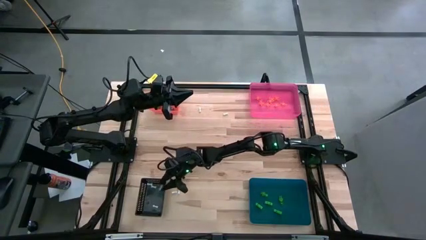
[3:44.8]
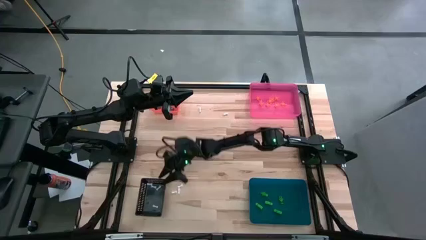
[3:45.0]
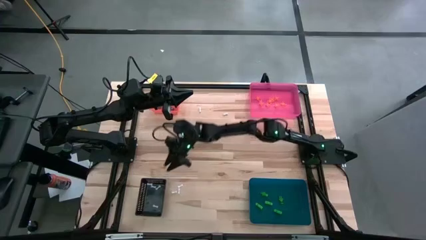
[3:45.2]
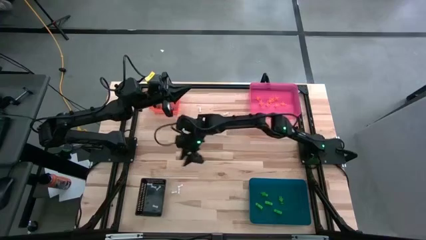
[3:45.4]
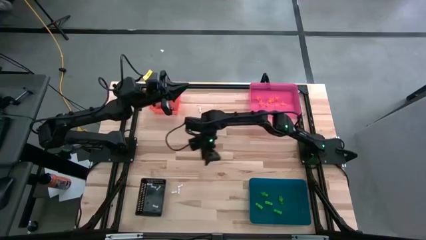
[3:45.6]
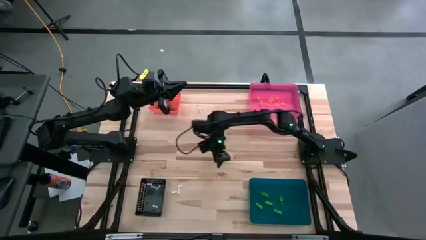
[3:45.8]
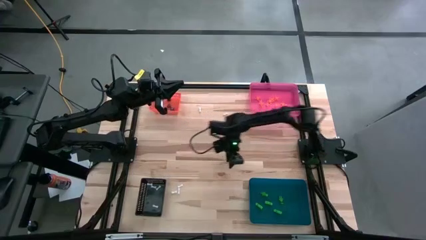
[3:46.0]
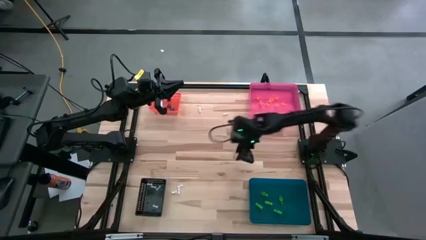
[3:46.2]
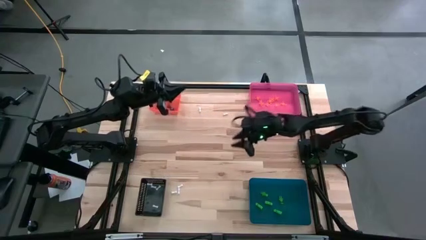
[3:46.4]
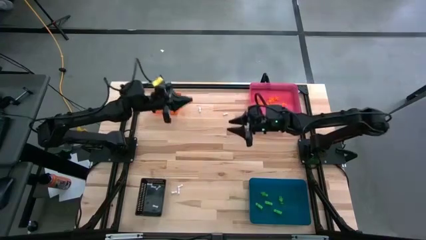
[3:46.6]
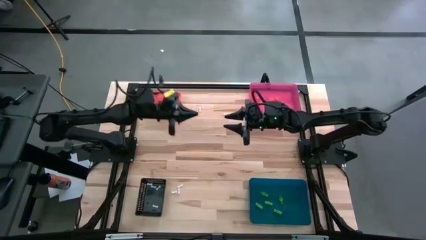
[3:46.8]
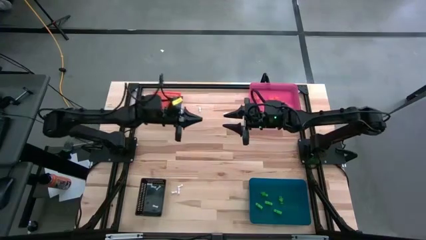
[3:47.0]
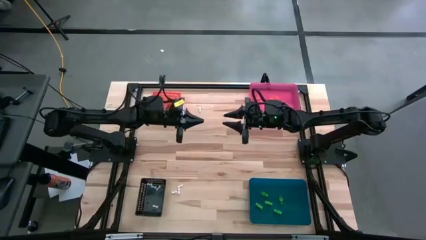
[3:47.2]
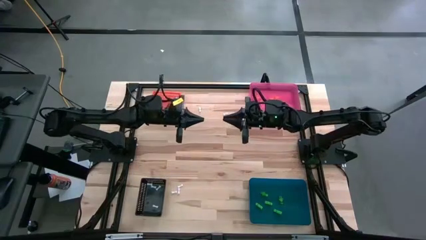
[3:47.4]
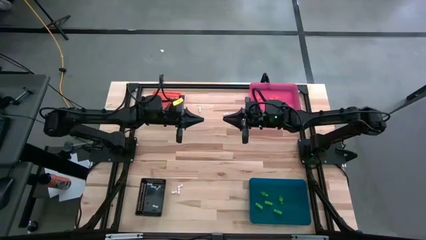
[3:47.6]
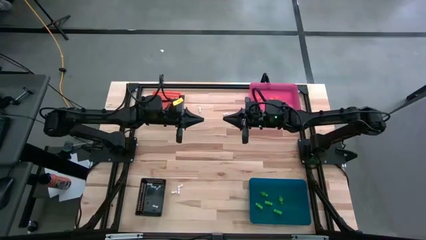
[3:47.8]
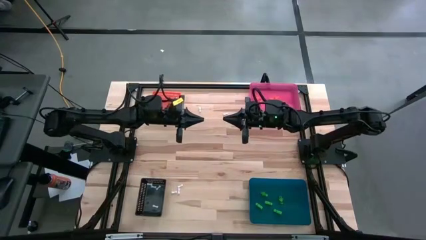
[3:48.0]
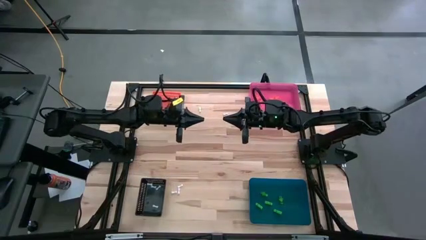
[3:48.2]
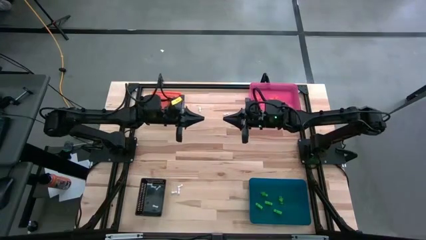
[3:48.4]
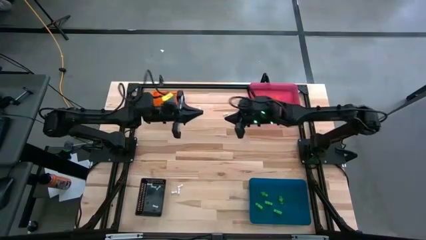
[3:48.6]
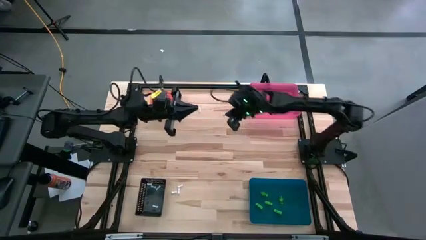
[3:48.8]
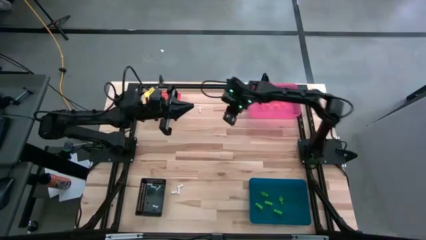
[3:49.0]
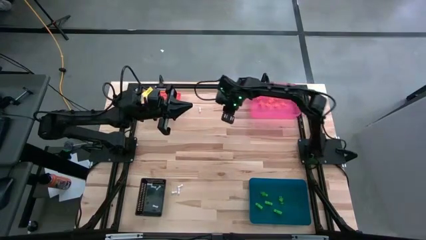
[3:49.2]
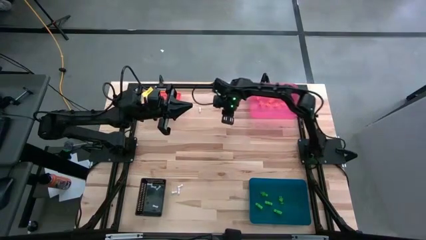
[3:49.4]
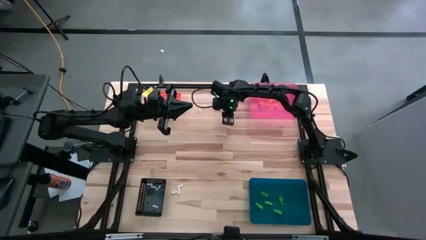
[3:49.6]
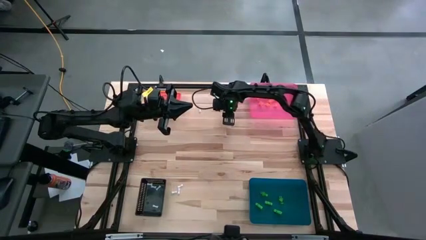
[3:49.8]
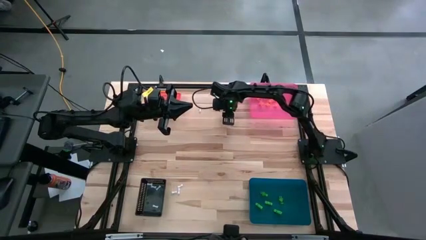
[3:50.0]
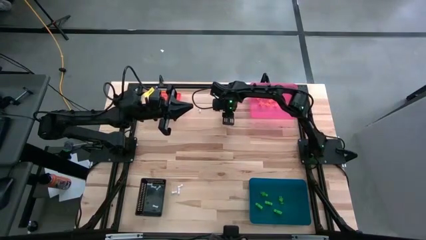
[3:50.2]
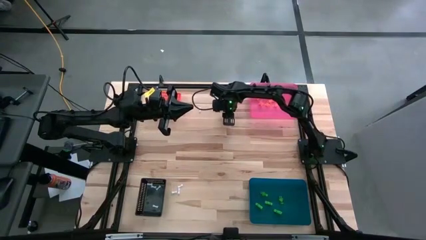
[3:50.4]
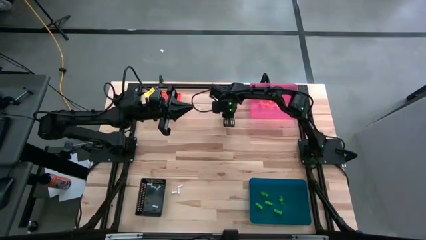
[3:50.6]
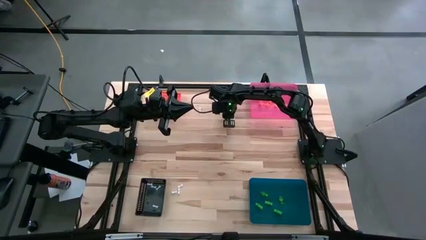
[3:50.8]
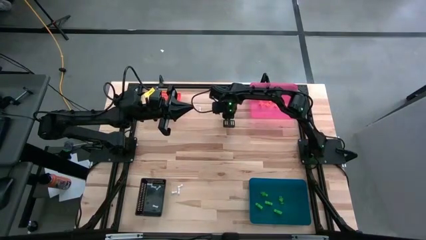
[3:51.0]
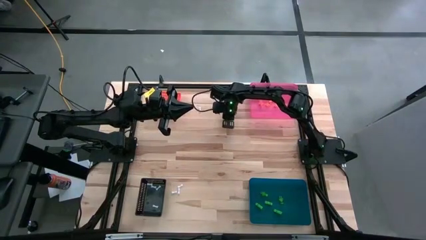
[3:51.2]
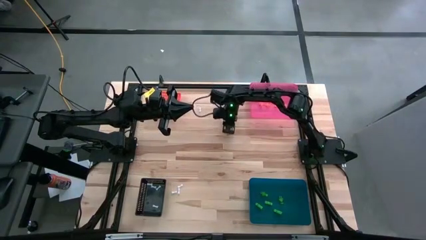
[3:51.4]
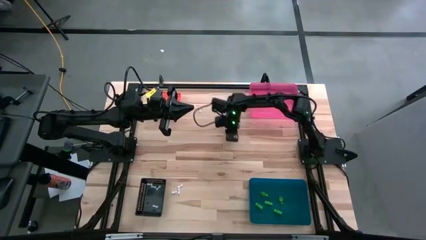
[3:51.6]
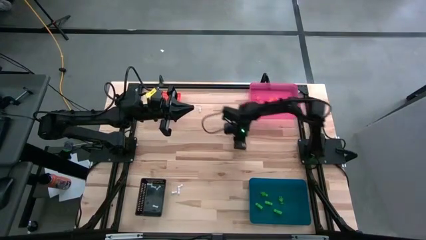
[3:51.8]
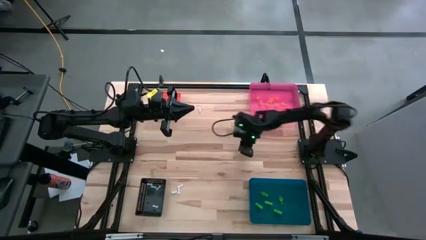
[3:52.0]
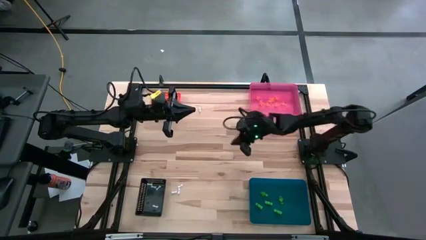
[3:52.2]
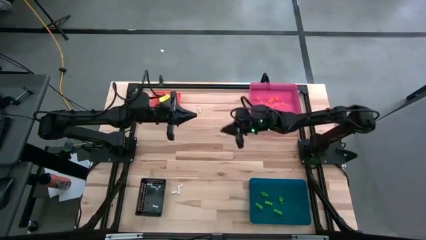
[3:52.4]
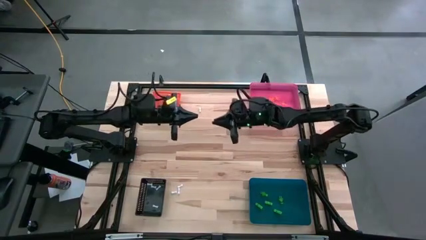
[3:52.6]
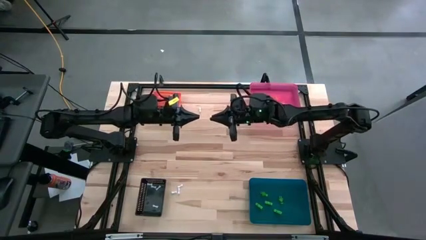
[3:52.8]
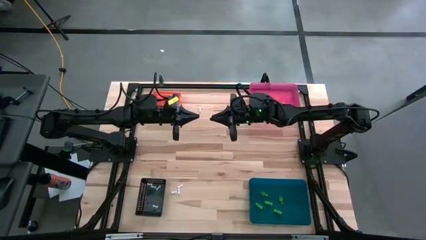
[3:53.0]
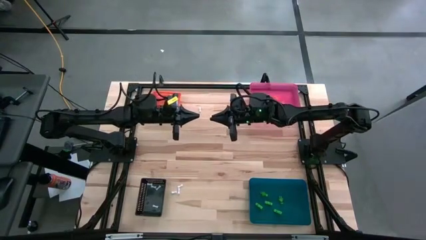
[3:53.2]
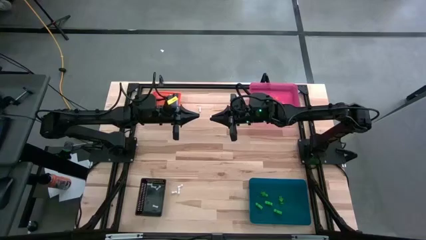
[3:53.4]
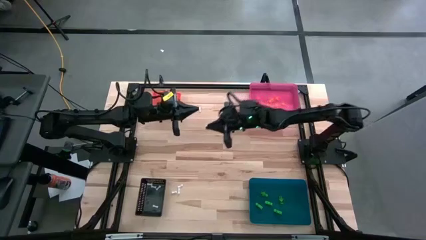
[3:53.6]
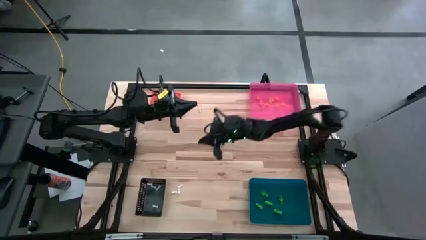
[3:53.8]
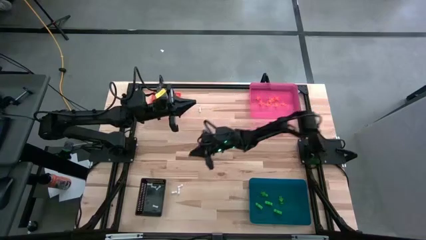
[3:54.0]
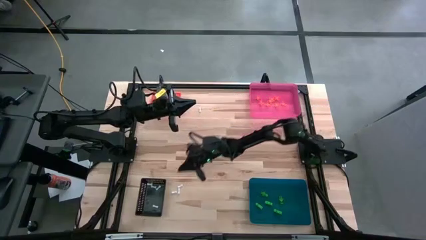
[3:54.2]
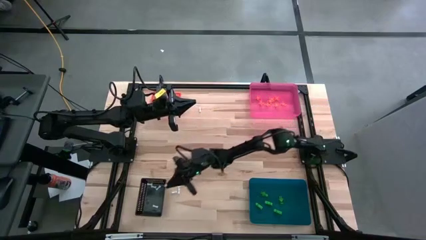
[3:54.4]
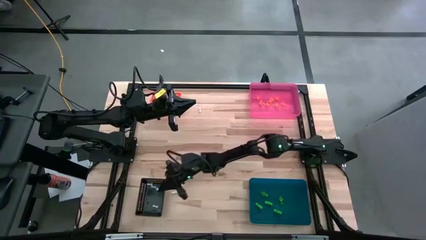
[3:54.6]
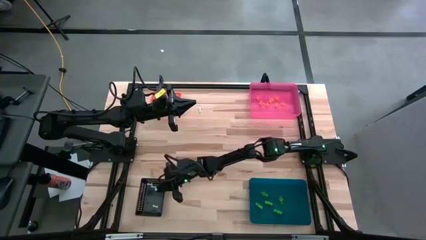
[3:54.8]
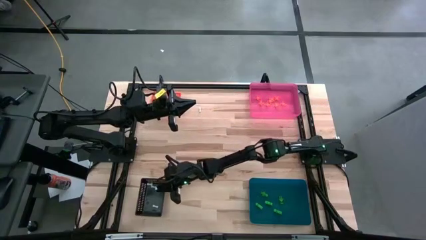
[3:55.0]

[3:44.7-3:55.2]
Task: Sort Halloween decoration
Put the white bone toy into the black bin

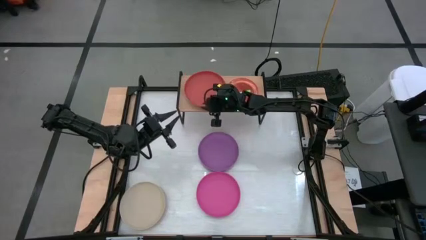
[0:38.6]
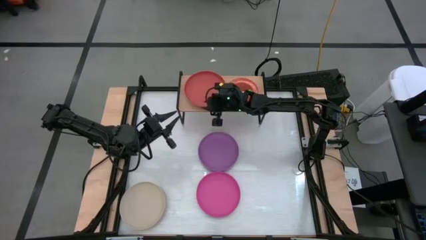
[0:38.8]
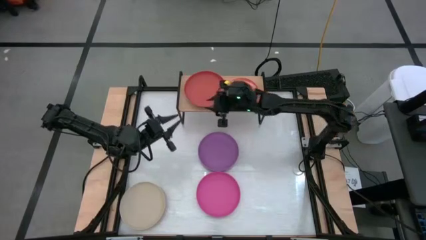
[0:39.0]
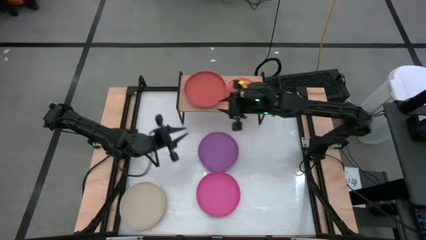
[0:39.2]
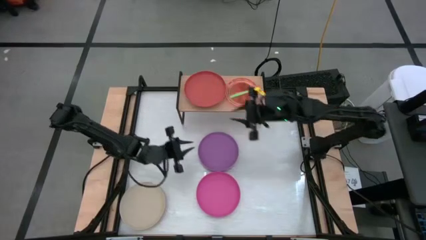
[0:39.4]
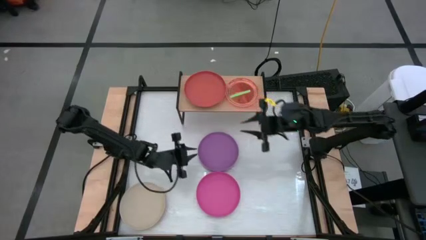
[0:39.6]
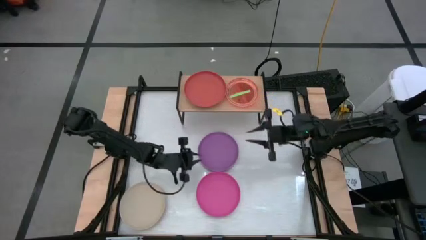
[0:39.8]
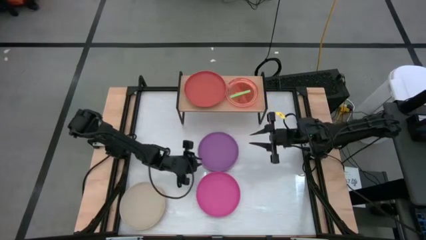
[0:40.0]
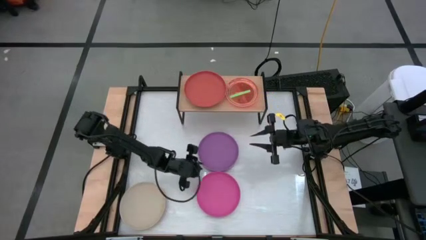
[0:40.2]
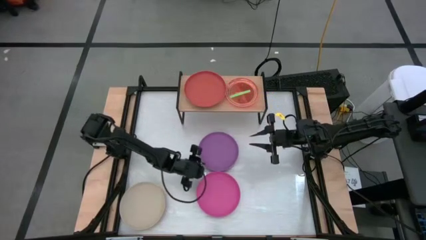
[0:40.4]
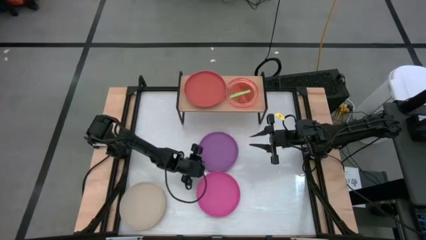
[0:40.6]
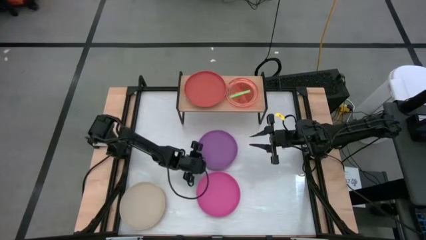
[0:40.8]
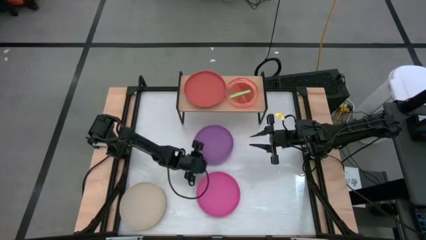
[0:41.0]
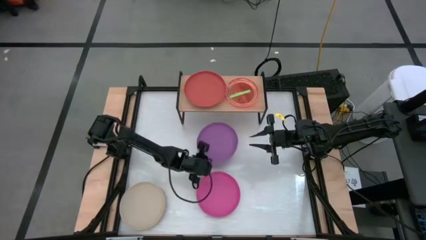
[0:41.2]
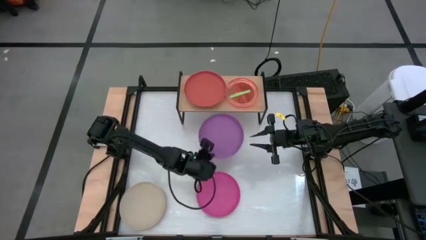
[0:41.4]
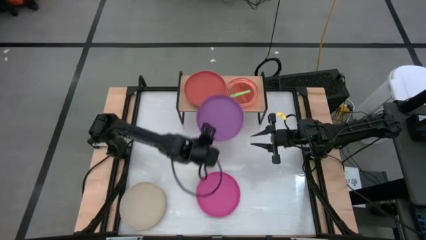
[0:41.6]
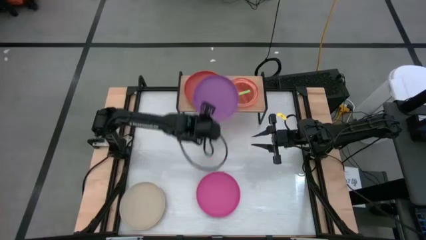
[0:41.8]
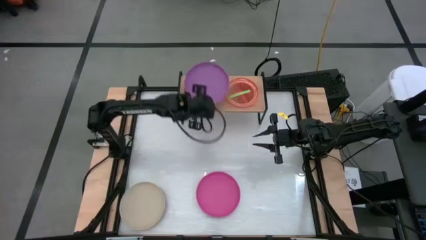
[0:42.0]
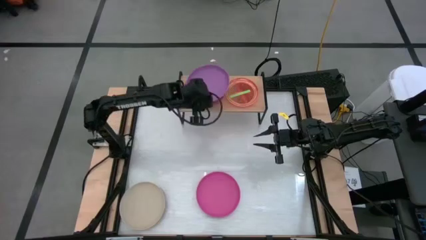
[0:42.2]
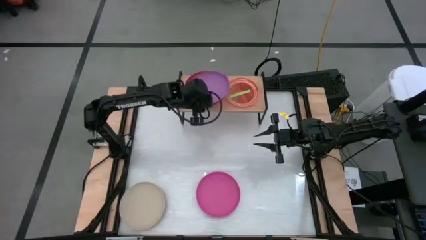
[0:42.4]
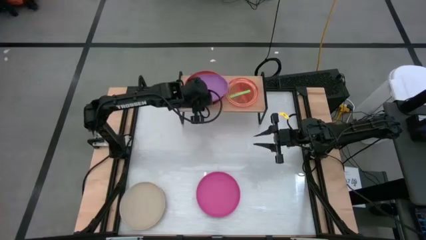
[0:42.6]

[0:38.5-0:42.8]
Task: Place and stack plates onto a shelf
Stack the purple plate on top of the orange plate on the shelf

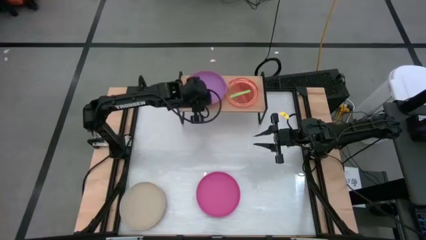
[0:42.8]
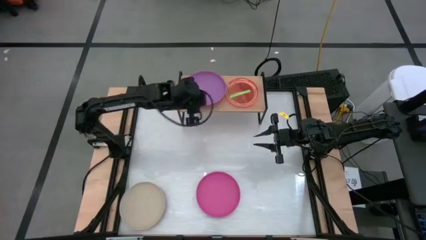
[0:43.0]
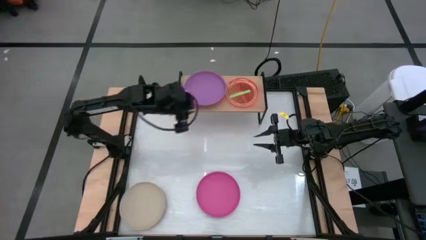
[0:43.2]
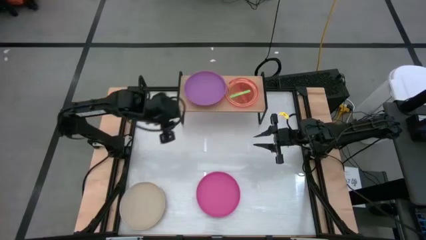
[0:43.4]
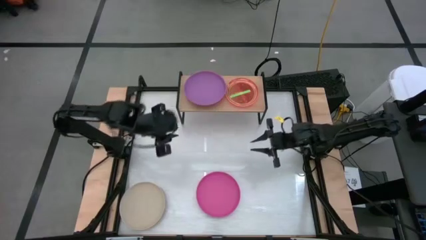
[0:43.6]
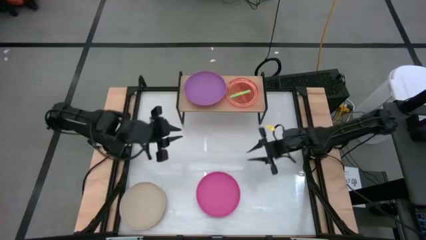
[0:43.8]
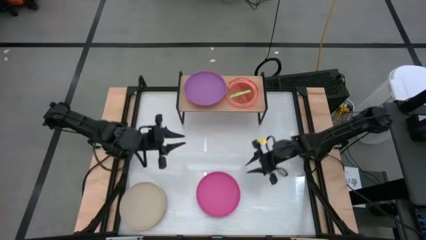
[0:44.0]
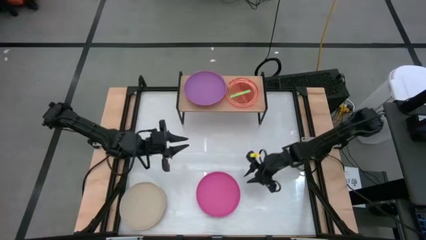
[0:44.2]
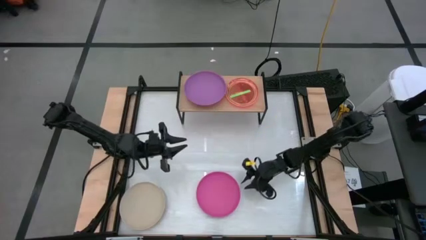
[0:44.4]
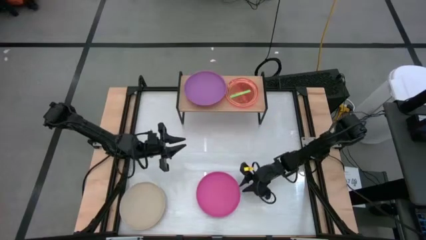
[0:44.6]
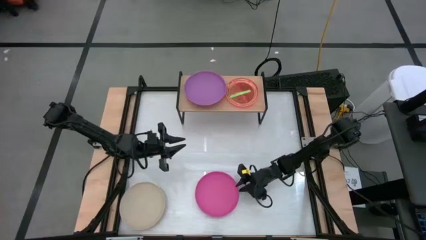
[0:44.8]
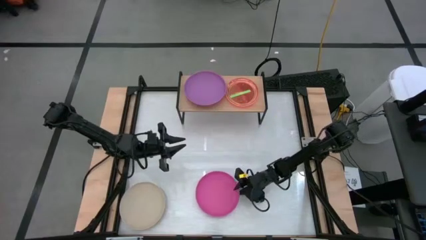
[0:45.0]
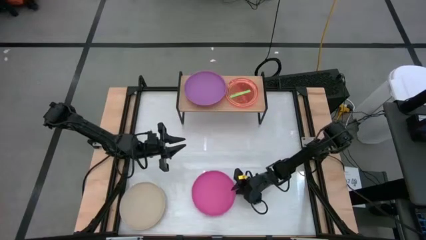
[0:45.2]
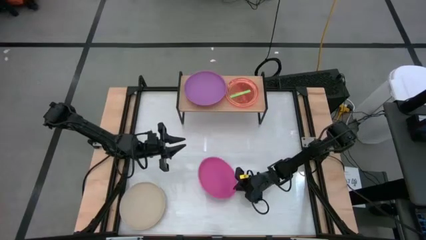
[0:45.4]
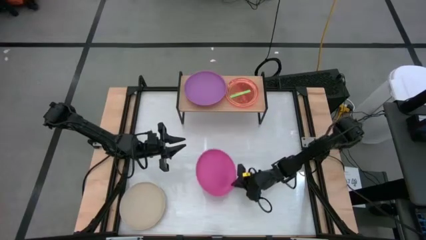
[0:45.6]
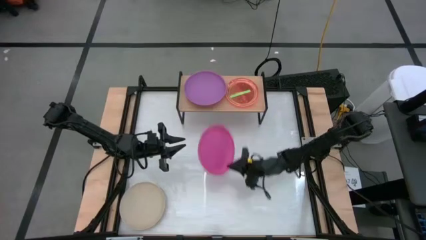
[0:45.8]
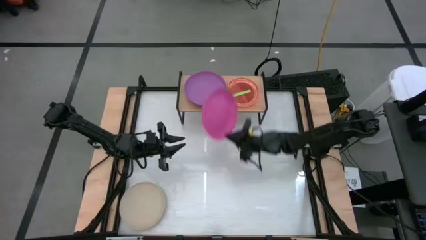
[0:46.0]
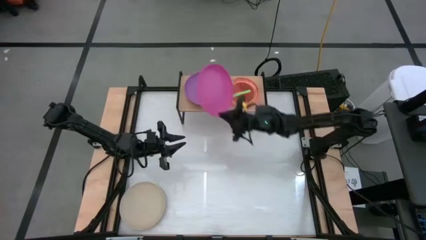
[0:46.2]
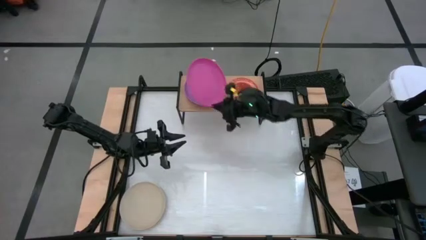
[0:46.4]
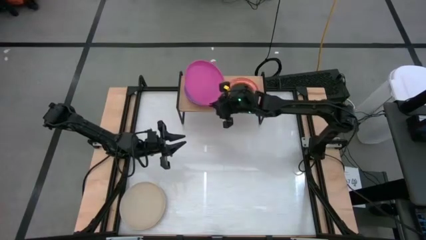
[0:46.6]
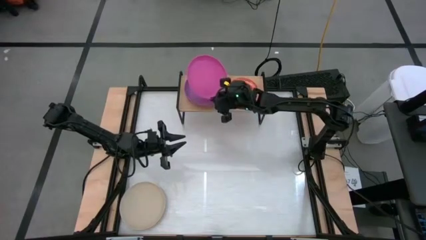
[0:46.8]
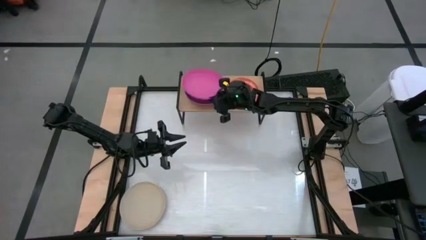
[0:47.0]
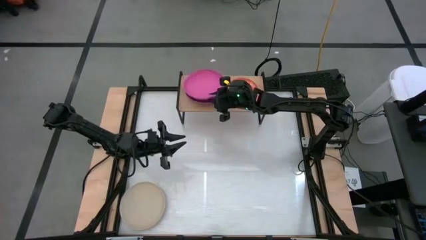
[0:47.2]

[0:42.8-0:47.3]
Stack the pink plate on top of the purple plate on the shelf
